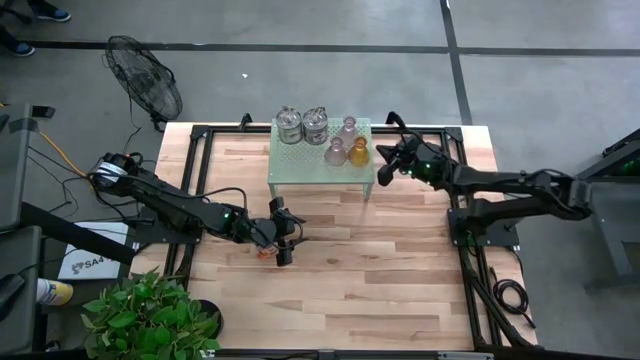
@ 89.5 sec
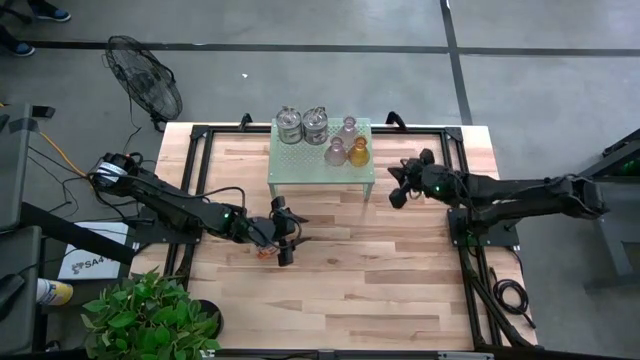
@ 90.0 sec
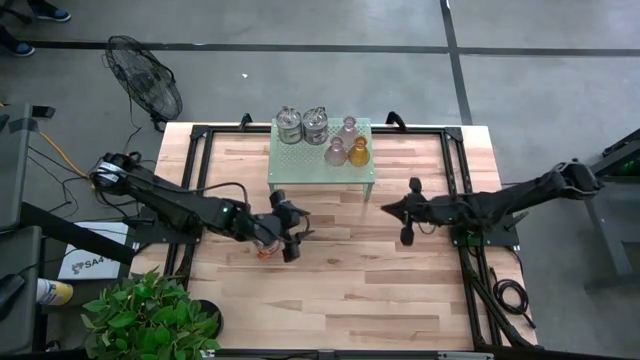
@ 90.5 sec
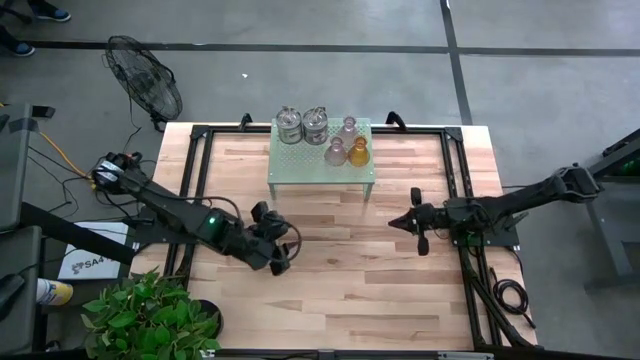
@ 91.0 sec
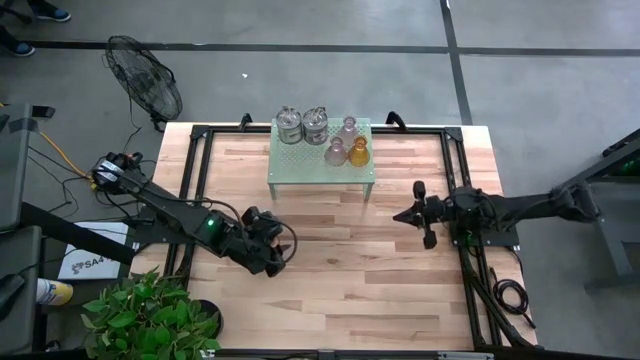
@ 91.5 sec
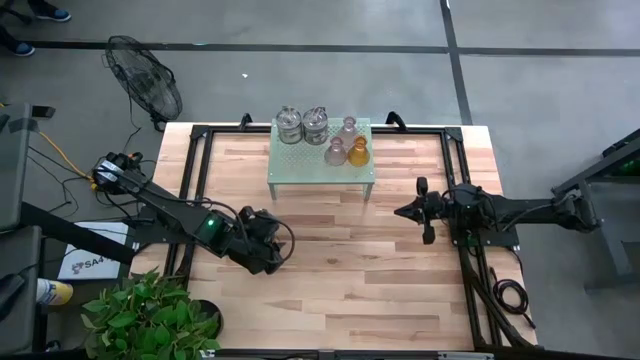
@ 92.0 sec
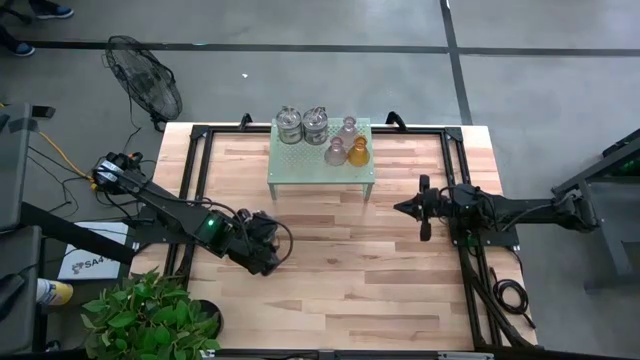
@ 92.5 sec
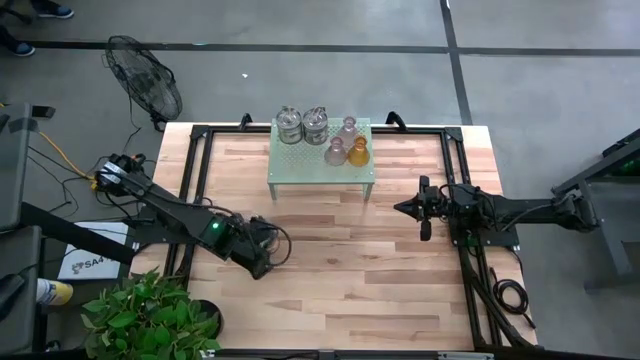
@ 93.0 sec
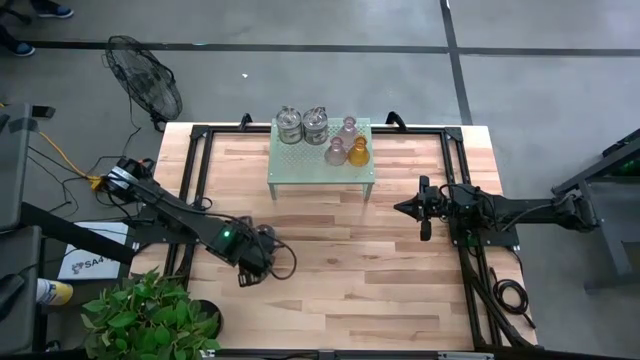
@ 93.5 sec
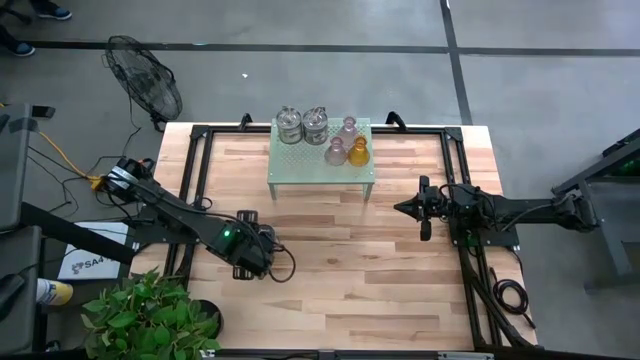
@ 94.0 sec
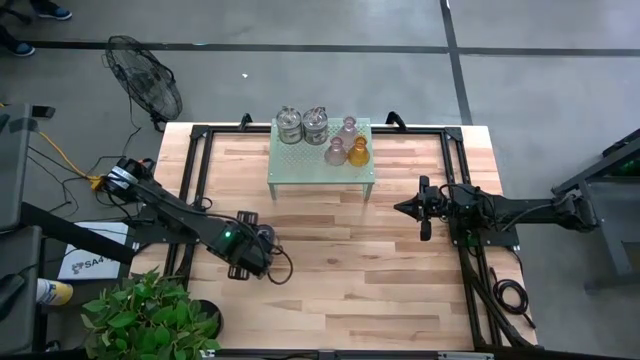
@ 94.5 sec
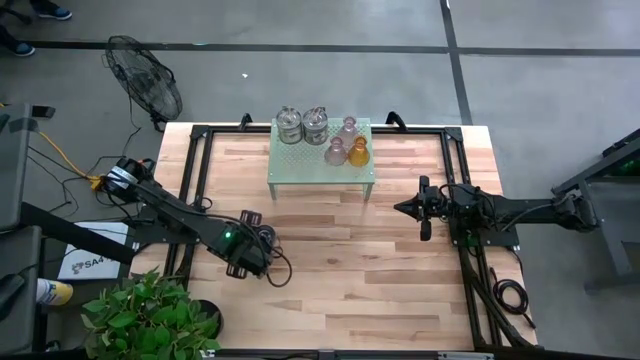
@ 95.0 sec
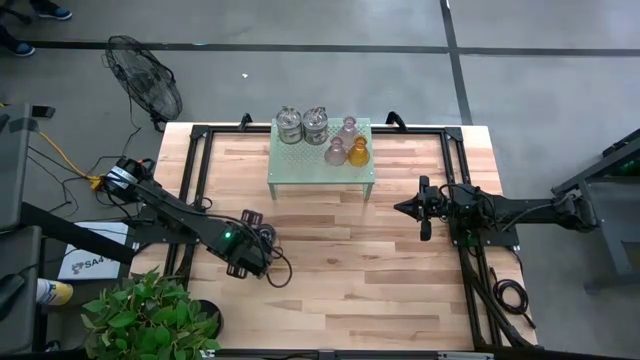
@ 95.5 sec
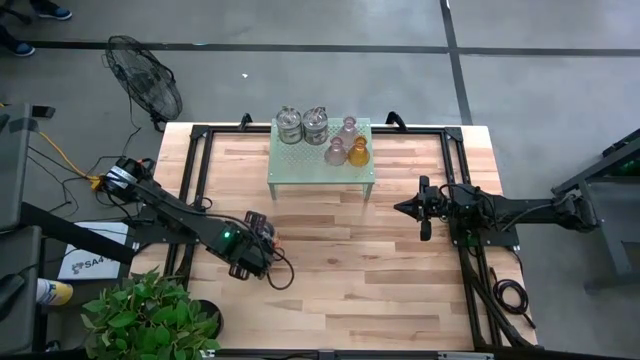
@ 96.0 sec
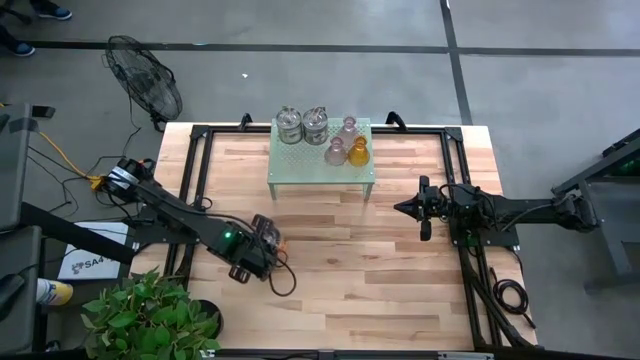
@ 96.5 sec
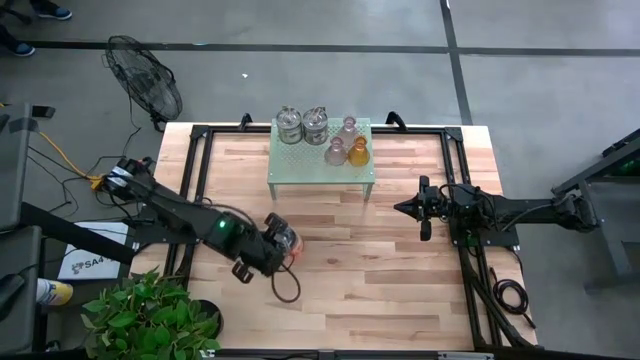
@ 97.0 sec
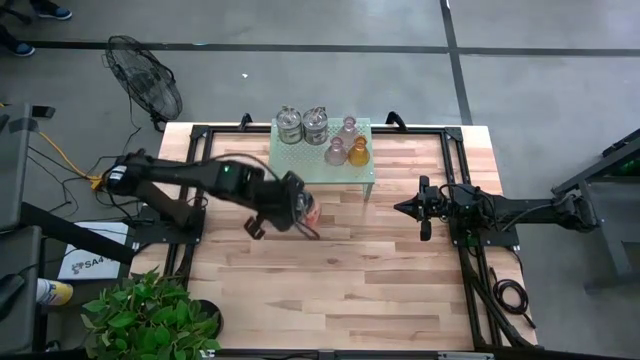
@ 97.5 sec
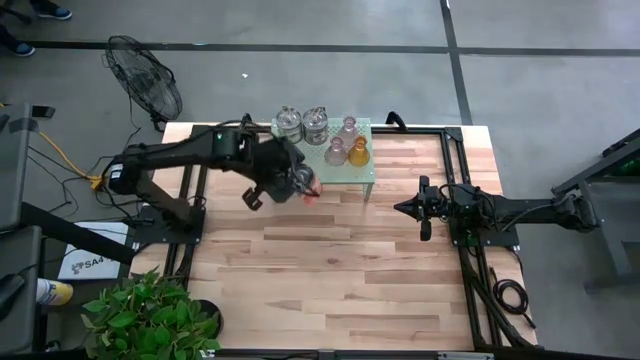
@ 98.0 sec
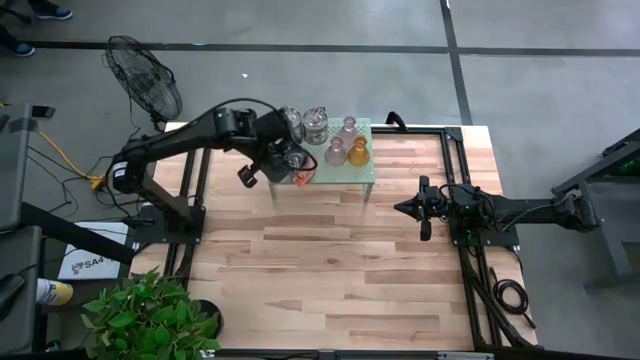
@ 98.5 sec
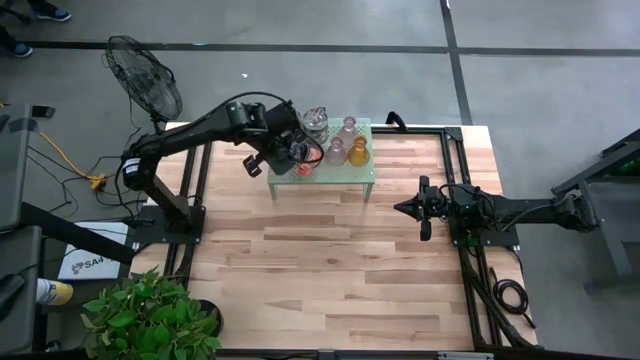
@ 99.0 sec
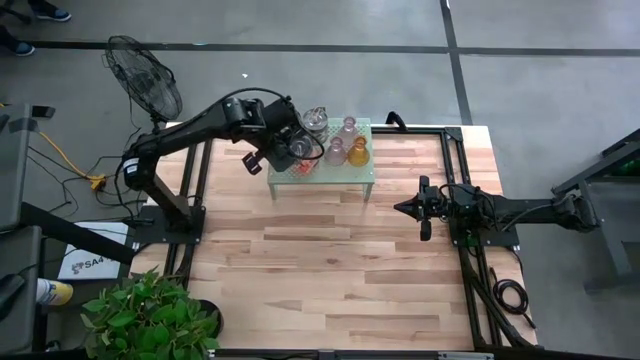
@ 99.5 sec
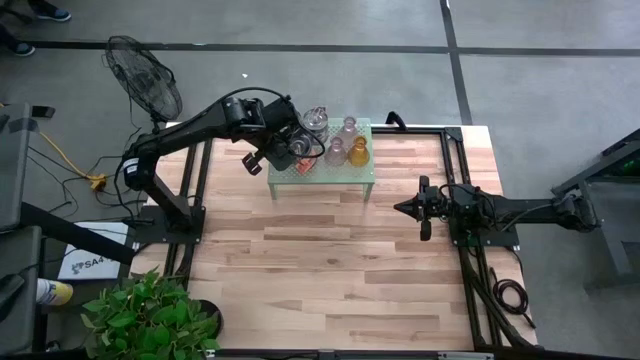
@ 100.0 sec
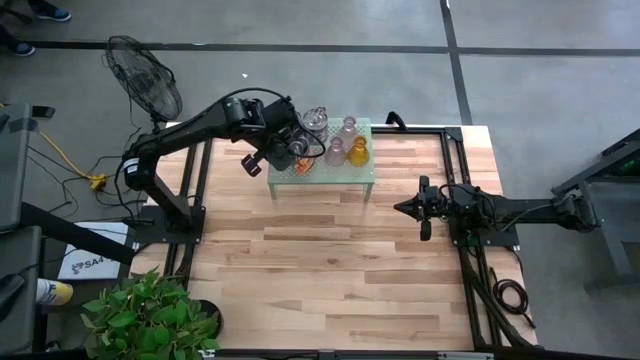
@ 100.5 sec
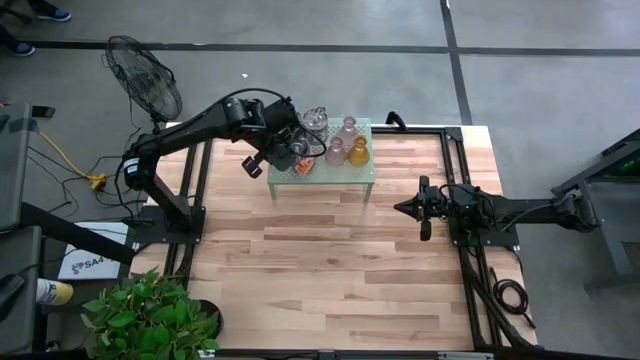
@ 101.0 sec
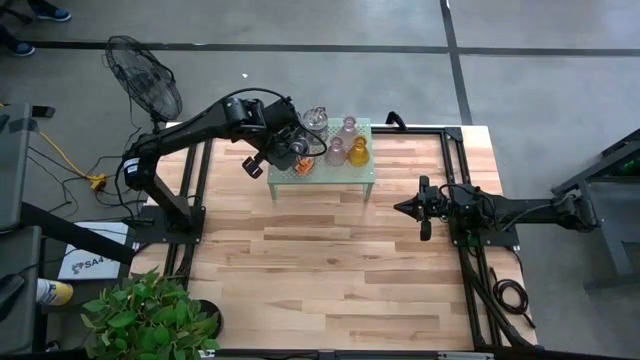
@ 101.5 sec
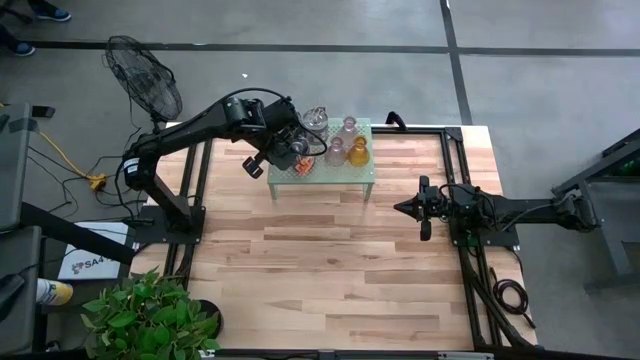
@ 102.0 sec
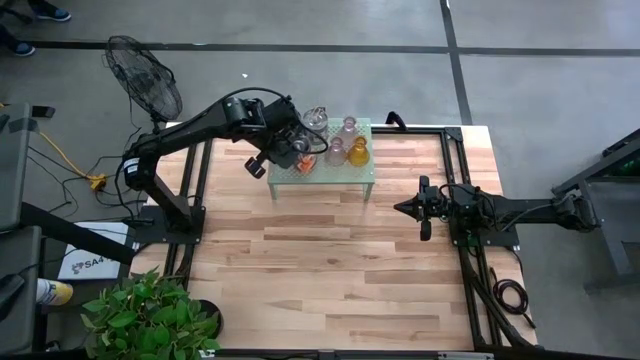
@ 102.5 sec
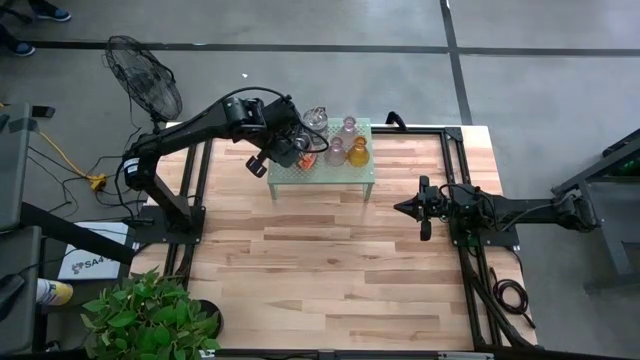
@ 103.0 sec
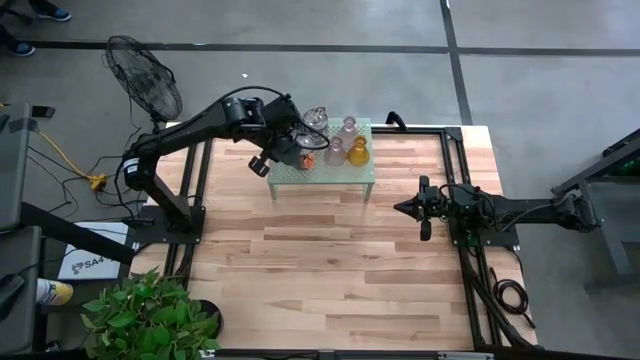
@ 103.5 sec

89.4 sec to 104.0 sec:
Task: Pick & Place candle stick holders
Put the silver scented candle on the shelf

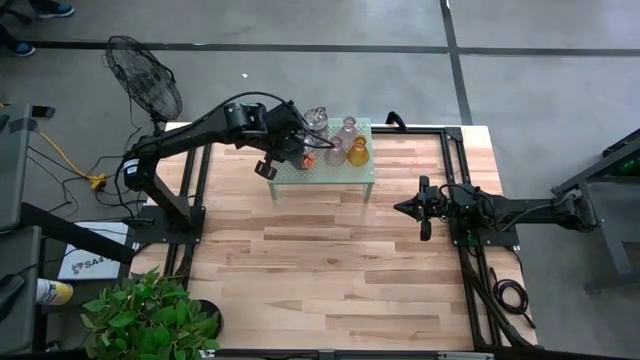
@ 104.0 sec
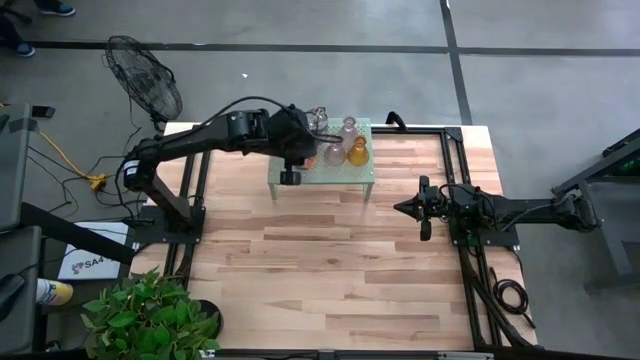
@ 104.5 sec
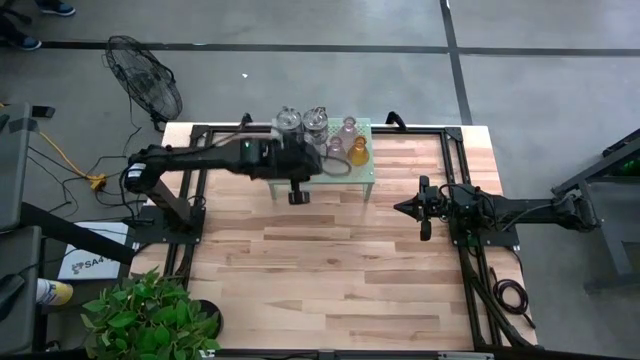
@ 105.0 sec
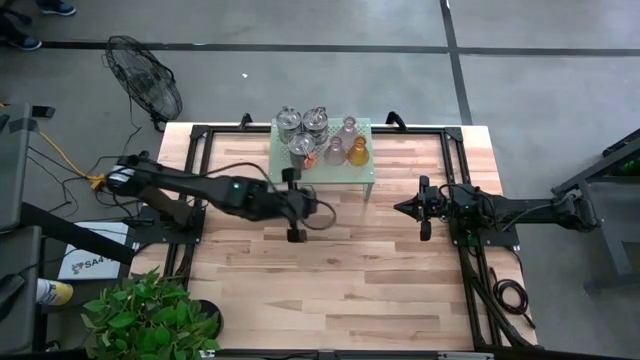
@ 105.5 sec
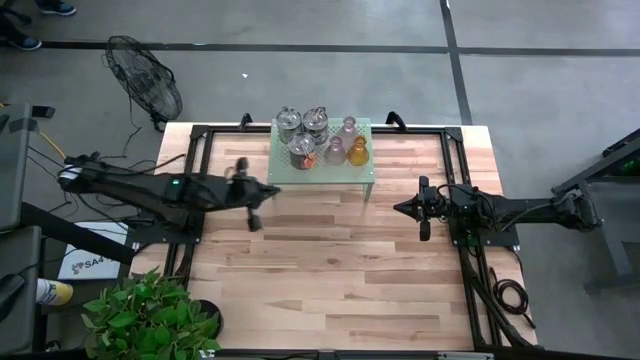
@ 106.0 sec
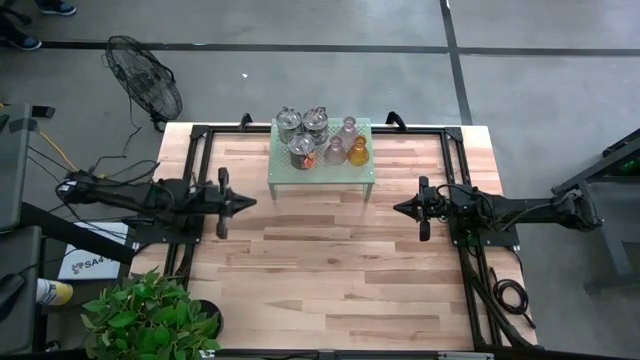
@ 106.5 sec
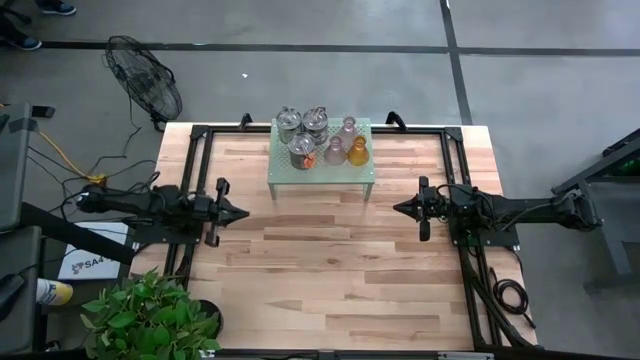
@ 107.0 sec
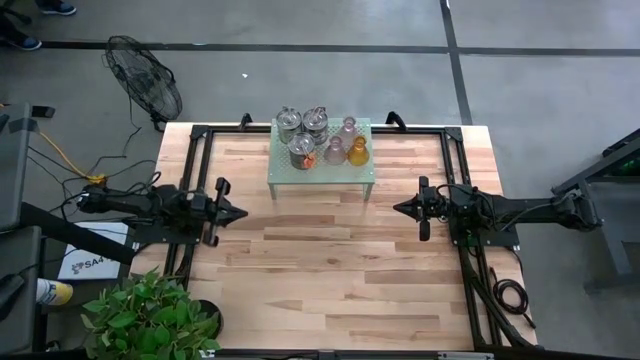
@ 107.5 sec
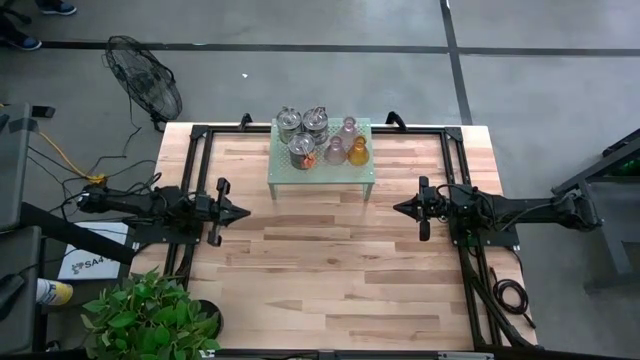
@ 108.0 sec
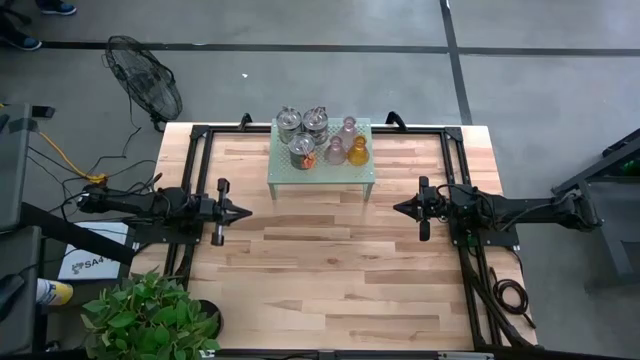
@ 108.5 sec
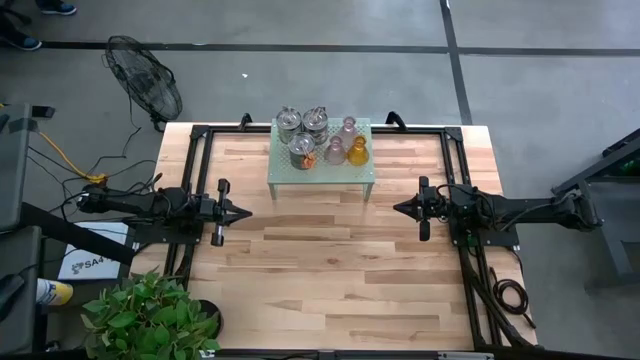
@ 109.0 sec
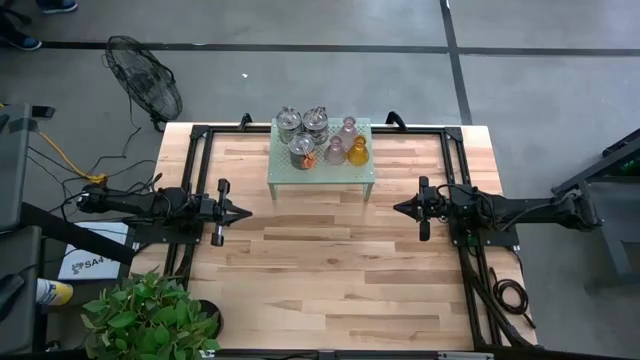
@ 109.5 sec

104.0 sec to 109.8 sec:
Return to Home Position

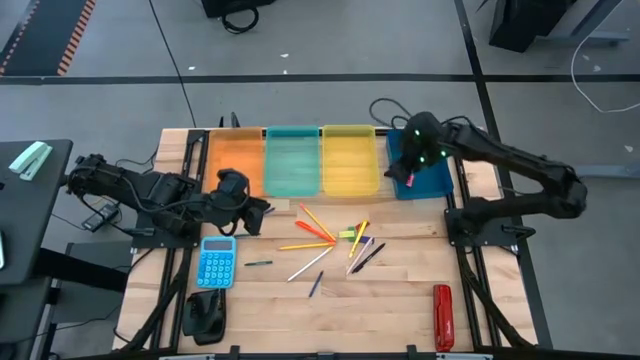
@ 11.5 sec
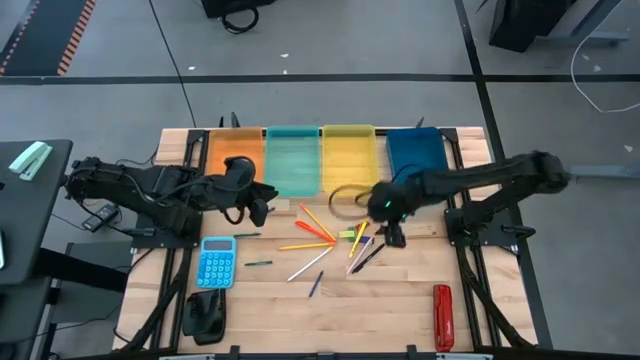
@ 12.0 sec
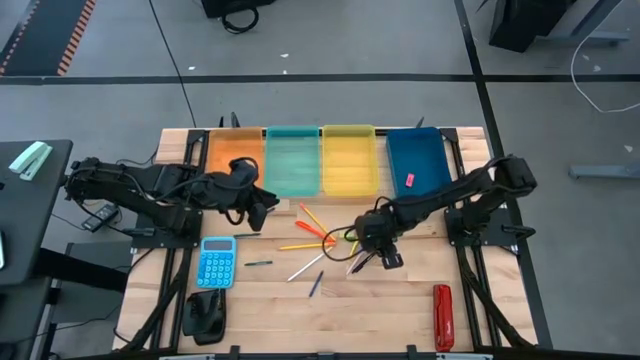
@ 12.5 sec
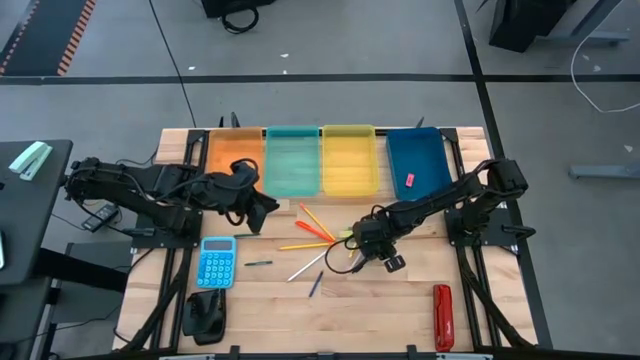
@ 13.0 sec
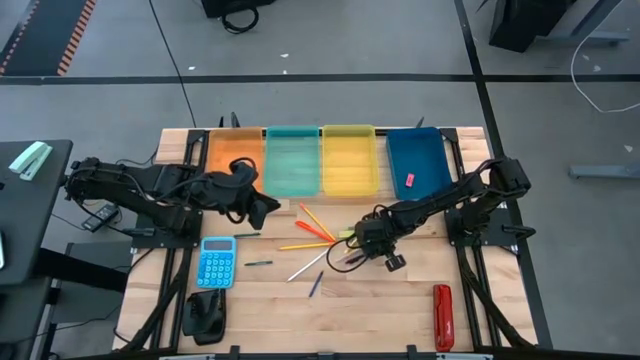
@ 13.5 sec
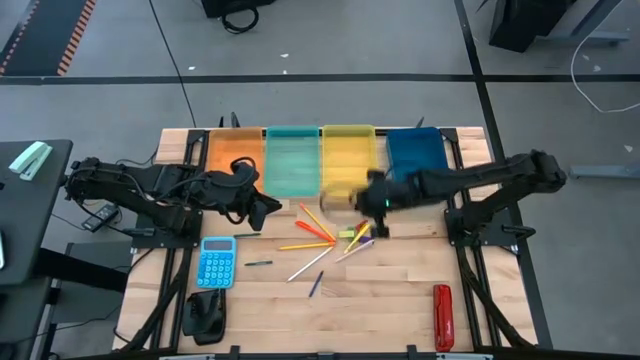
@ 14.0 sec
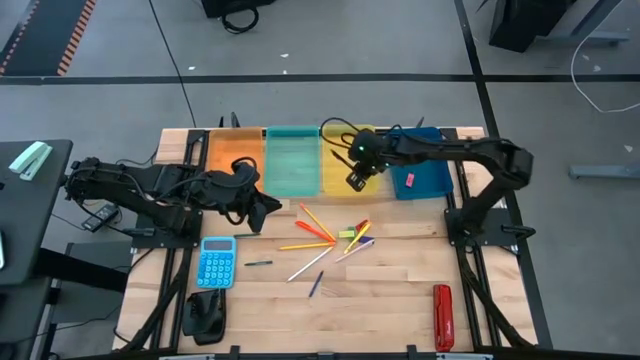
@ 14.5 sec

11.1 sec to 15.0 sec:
Task: Sort crayons/erasers/pens/pencils in bins
Put the black pen into the yellow bin
